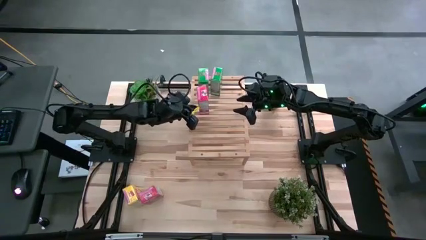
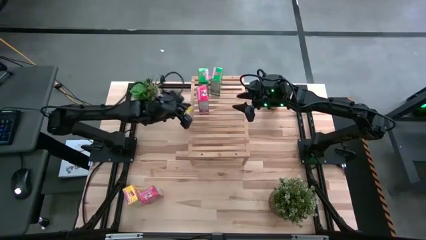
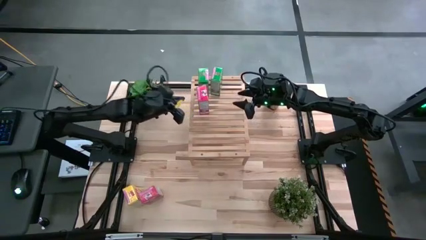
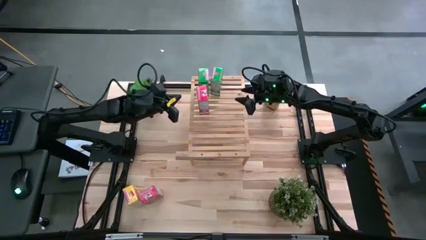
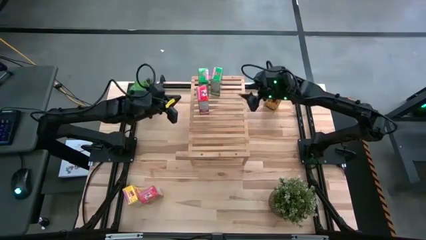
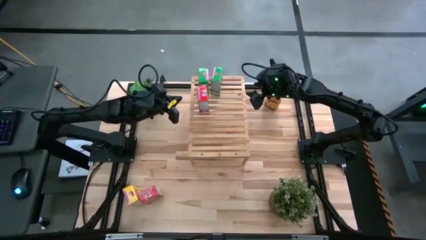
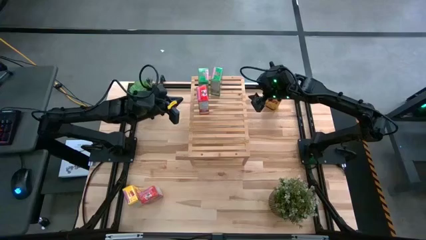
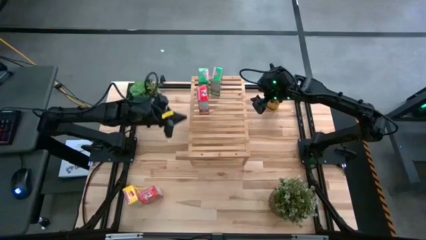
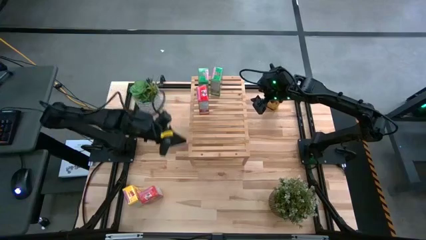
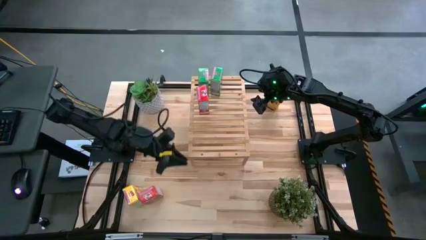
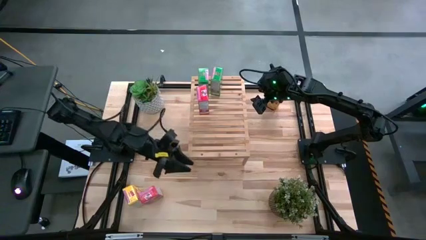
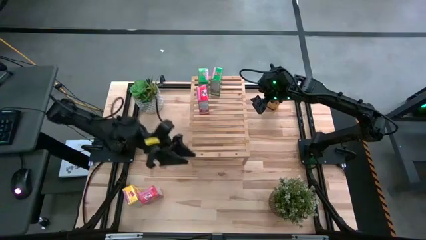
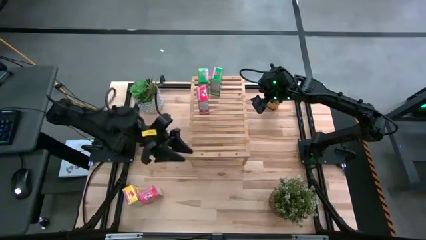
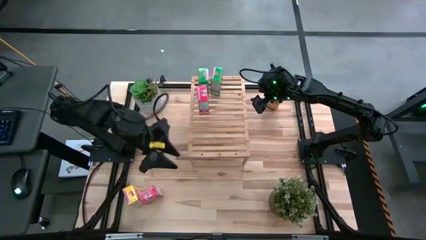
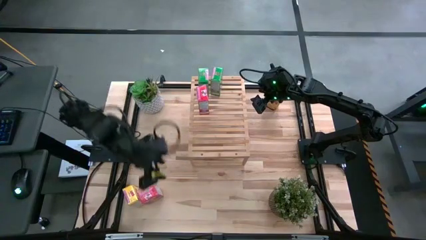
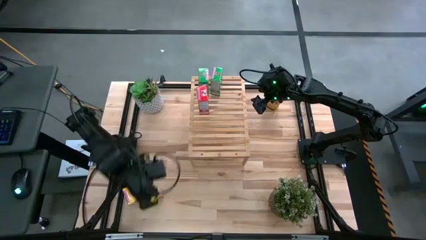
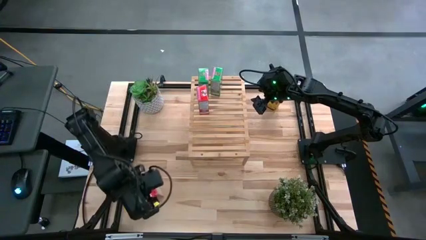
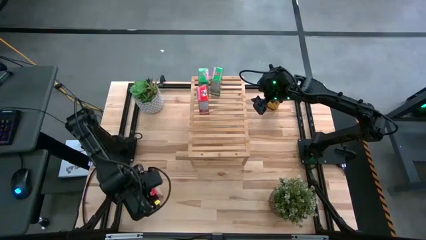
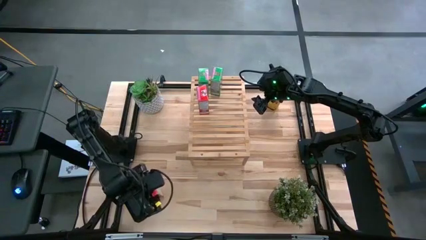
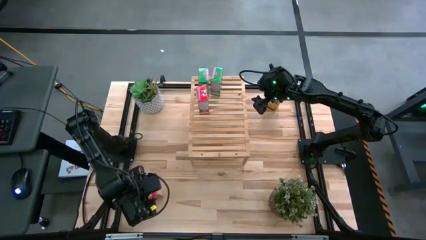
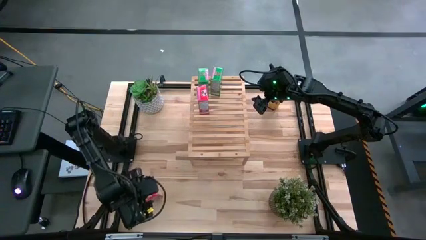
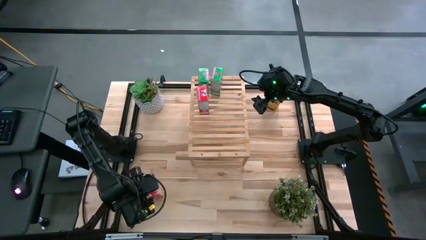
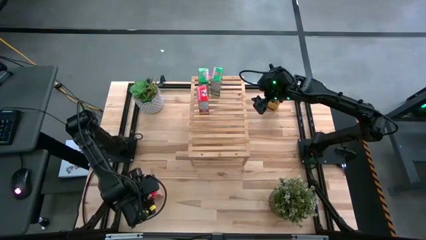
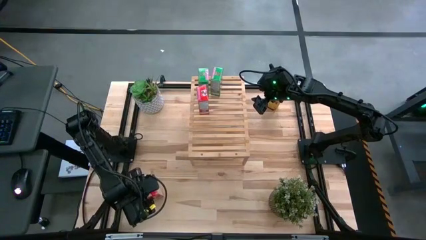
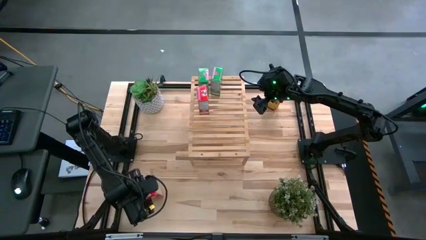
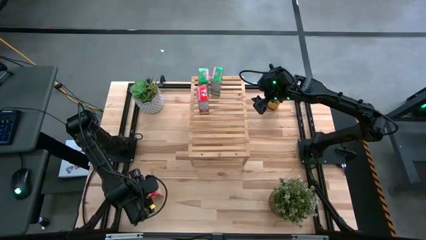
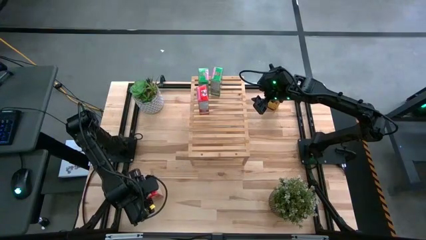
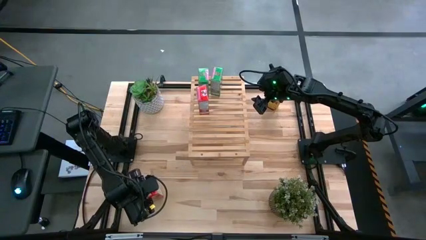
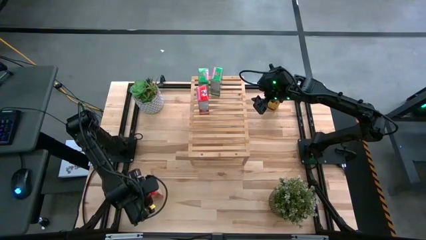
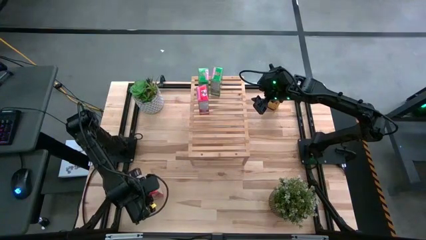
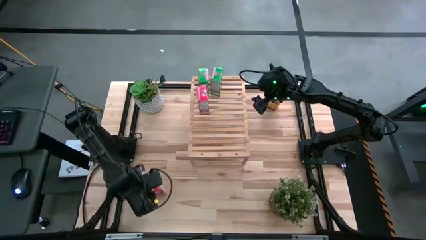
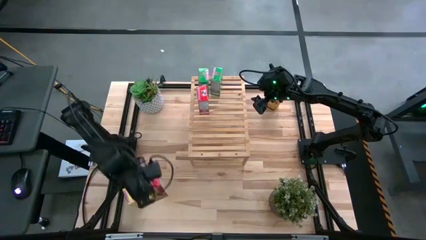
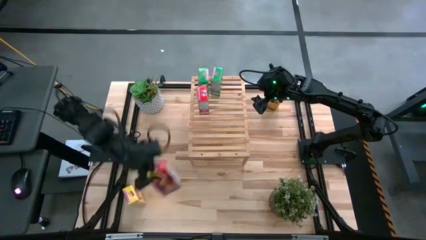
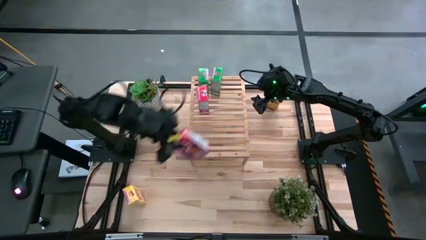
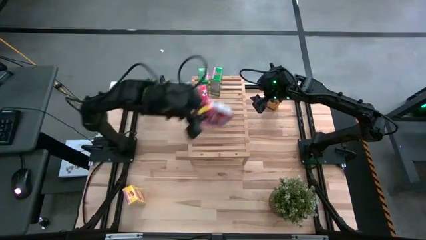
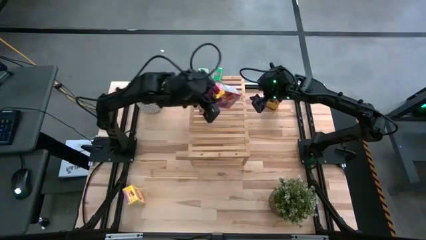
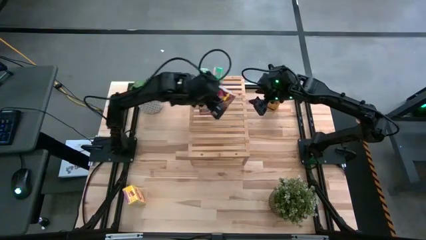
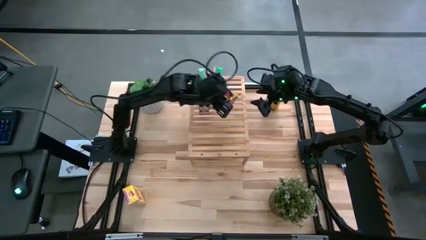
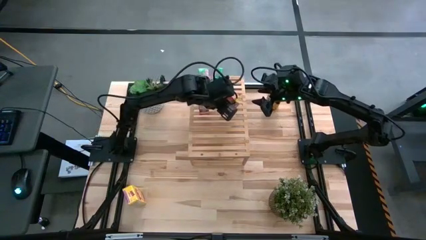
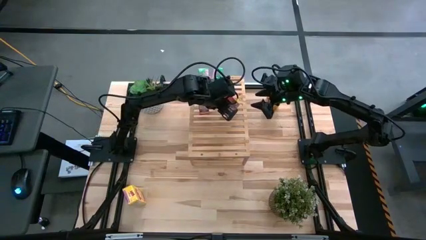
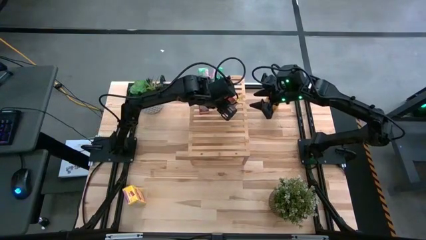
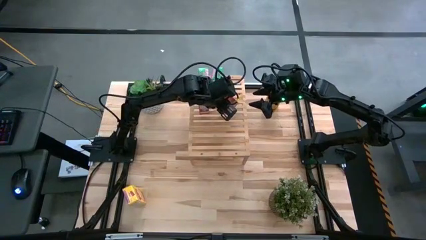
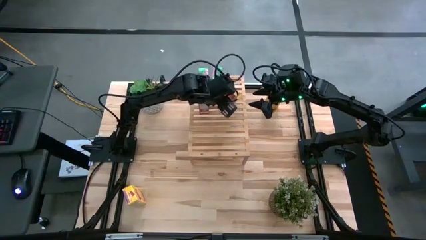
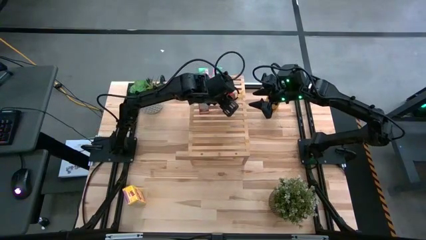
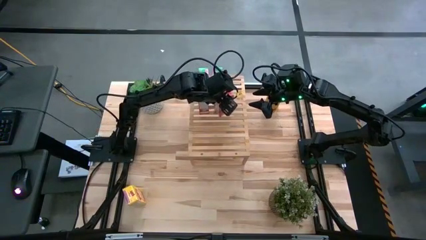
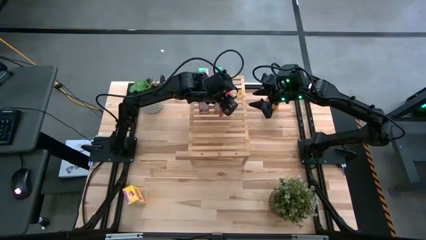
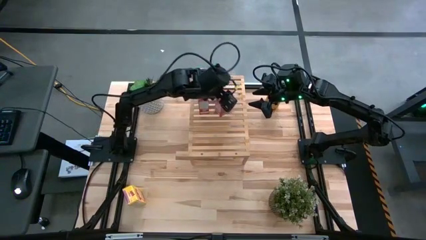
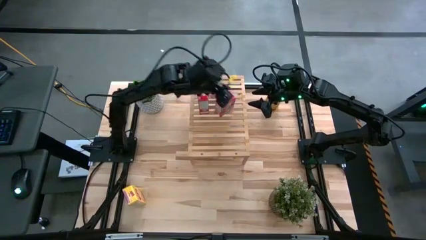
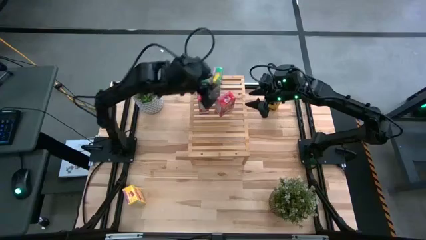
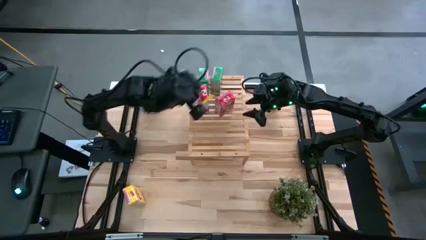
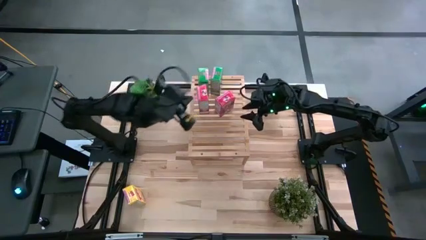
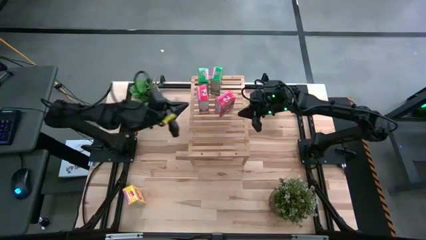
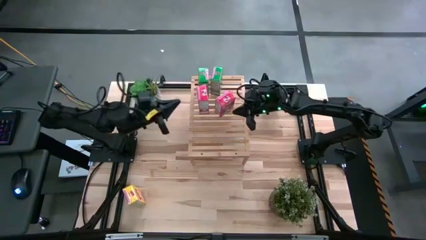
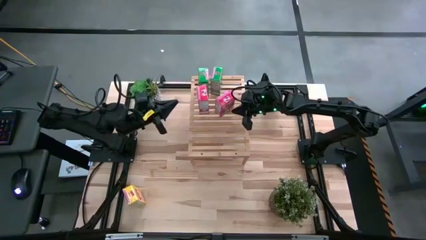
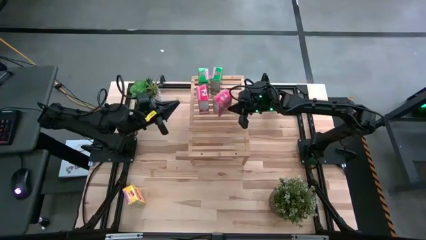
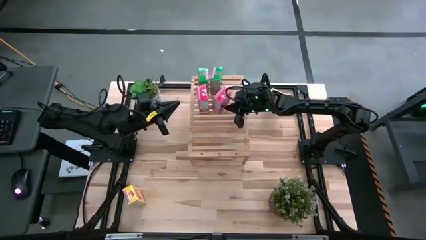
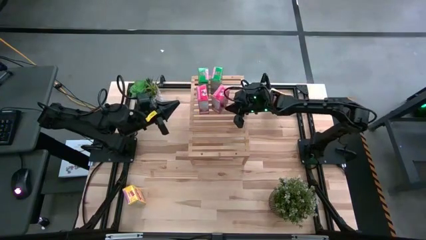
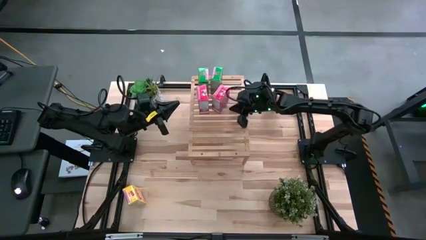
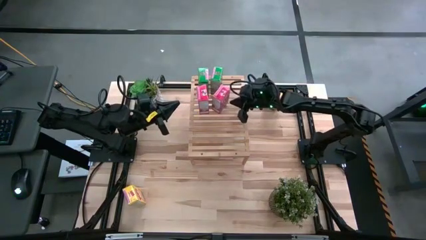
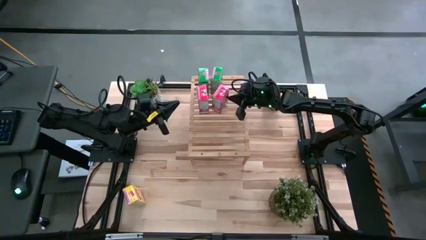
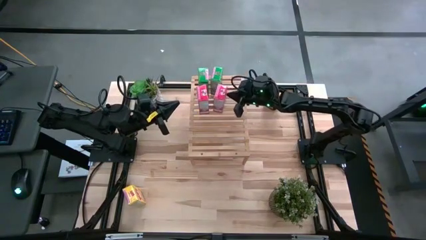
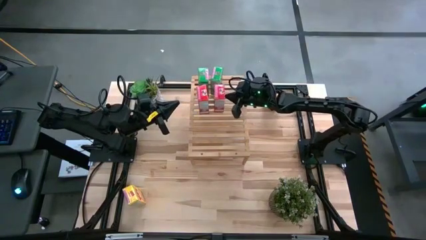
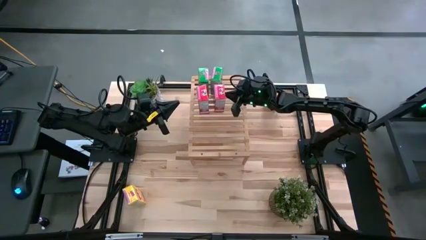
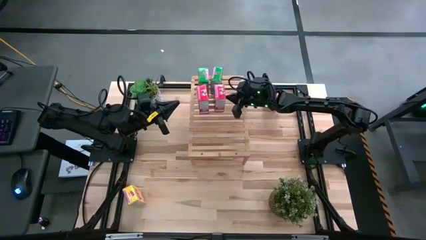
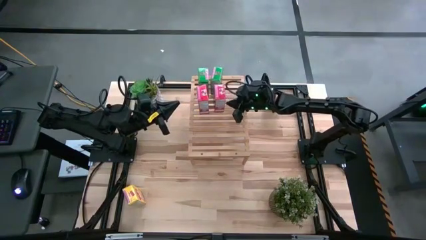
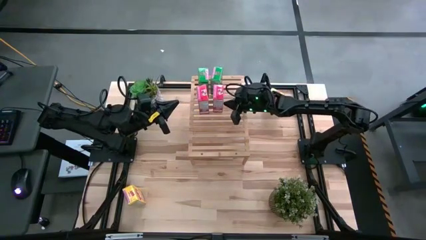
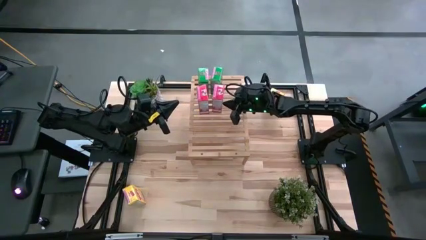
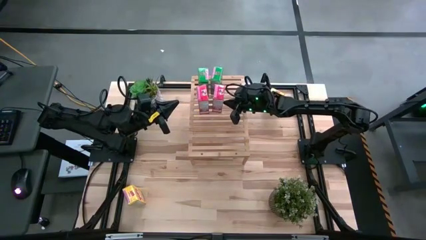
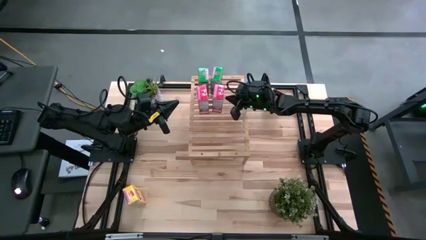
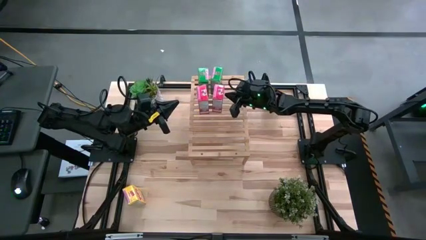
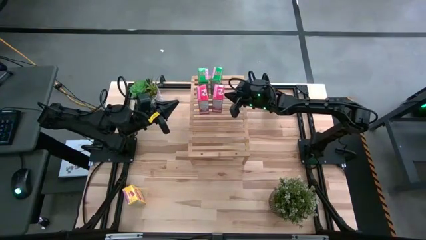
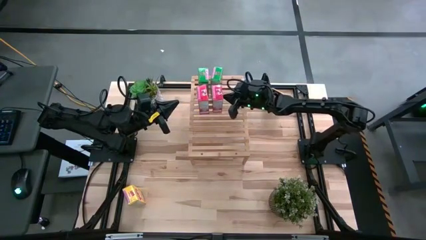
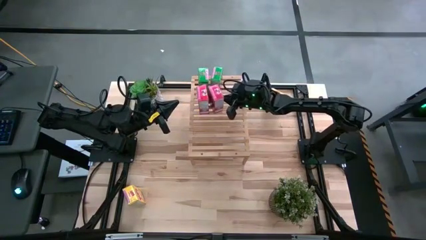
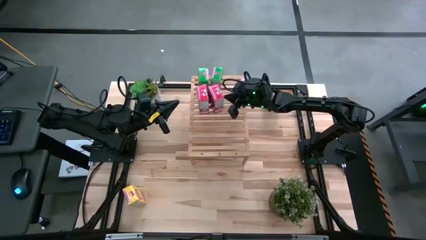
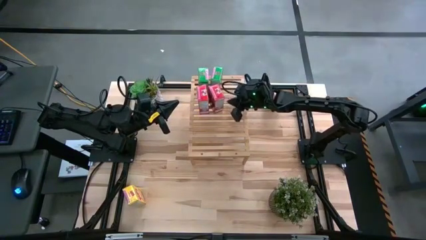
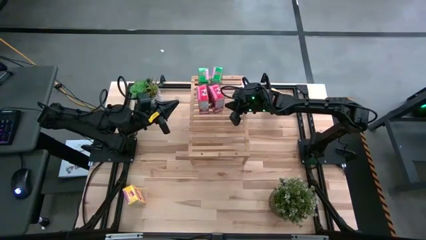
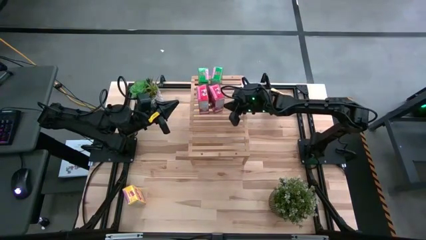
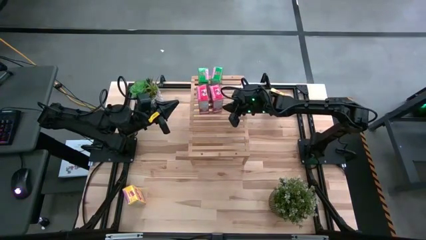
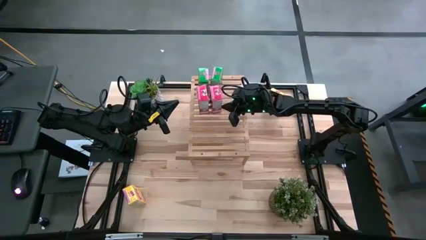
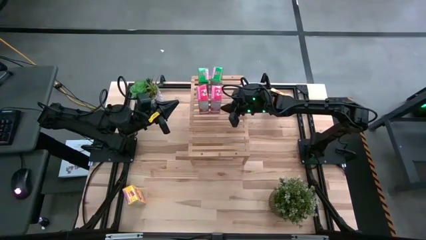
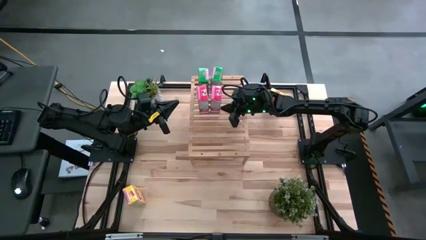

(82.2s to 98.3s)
Task: Stack cereal on shelf
Put the red cereal box on the shelf and align with the other red cereal box
